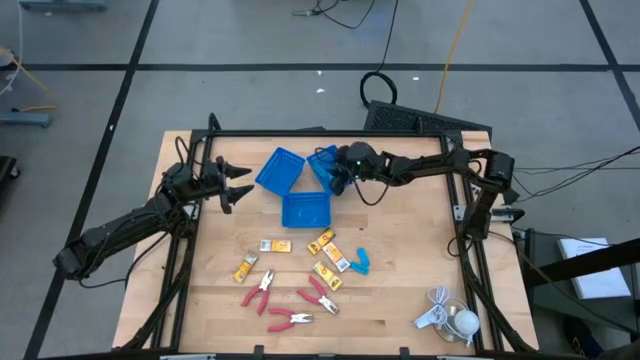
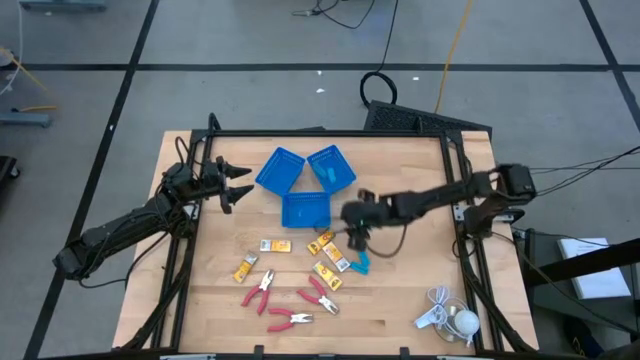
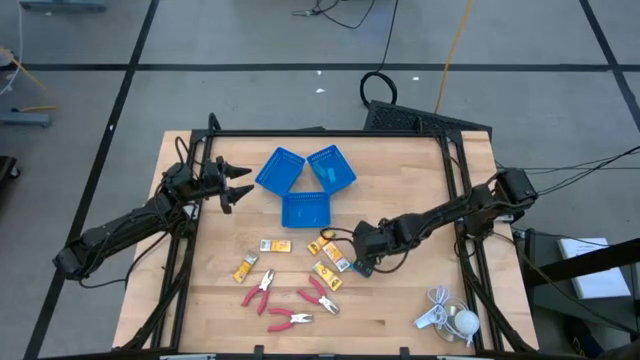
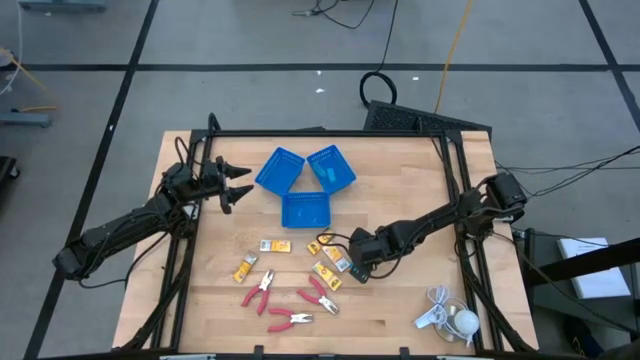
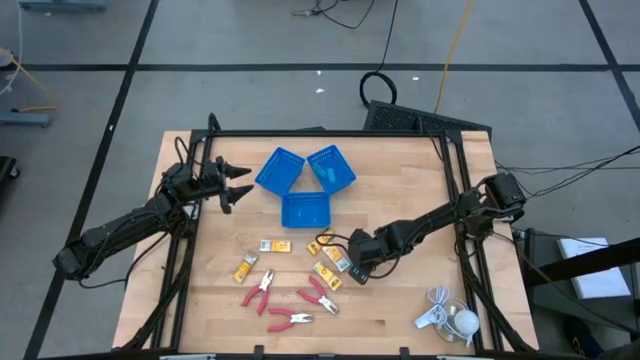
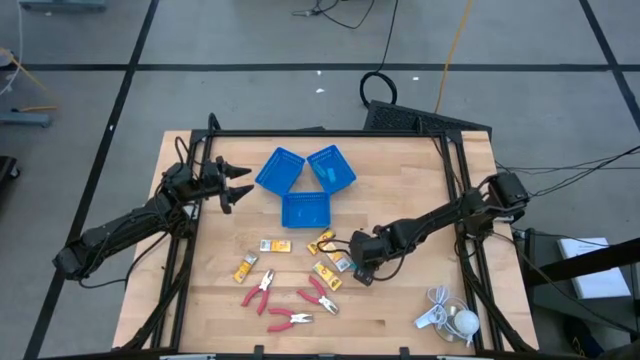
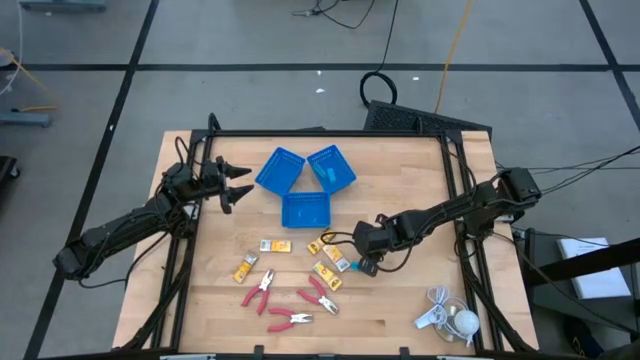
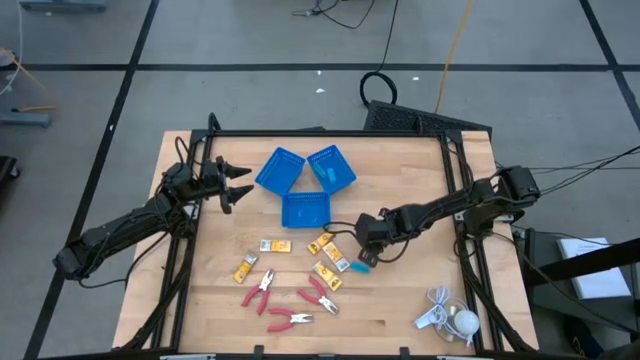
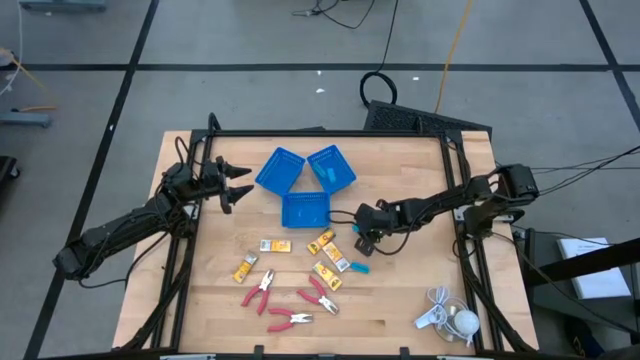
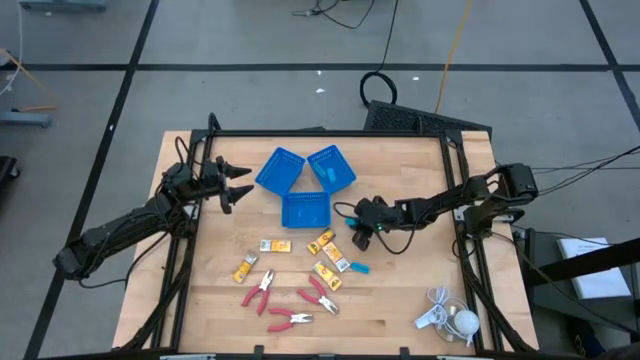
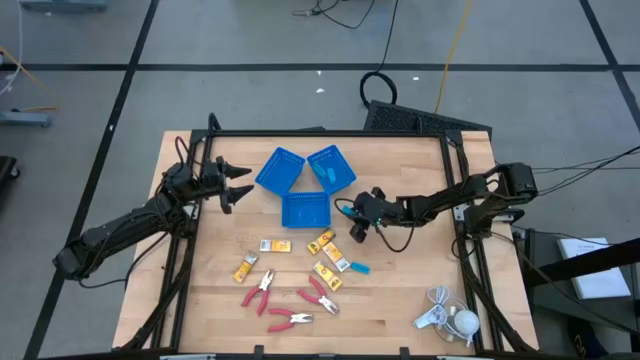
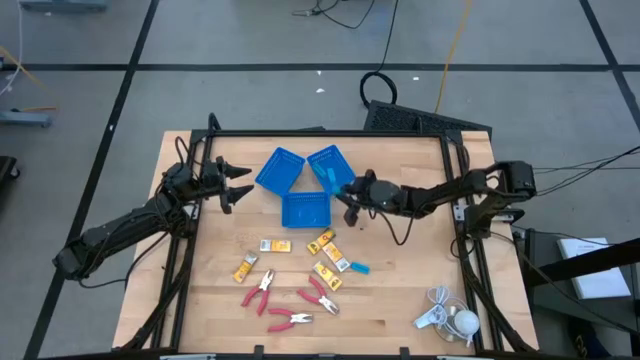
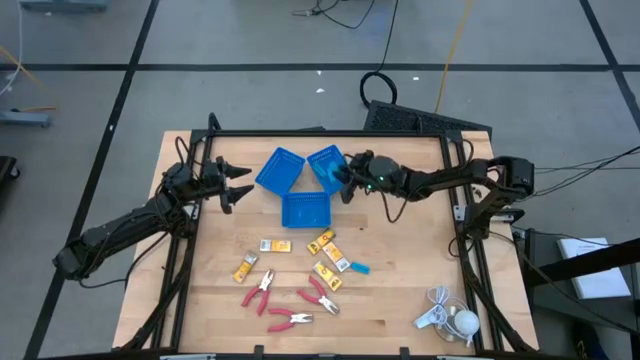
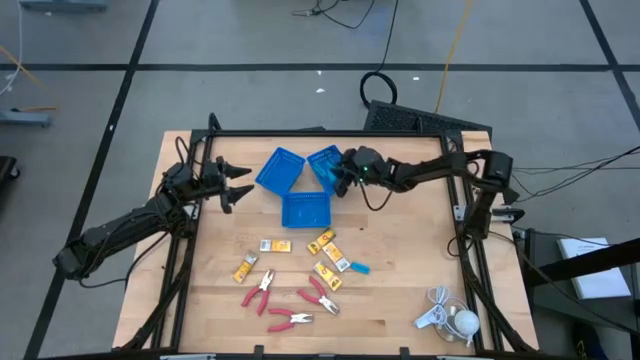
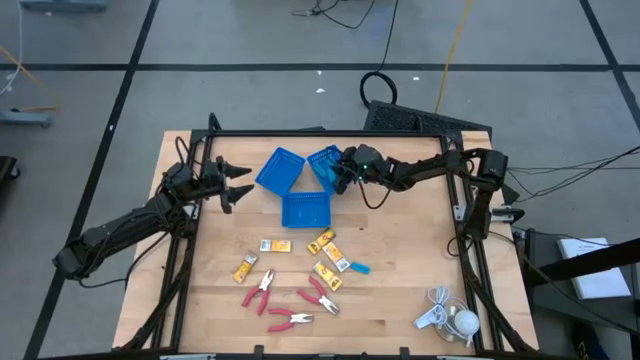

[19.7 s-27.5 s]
Task: Pick & Place School Supplies
Put the blue eraser into the top right blue bin

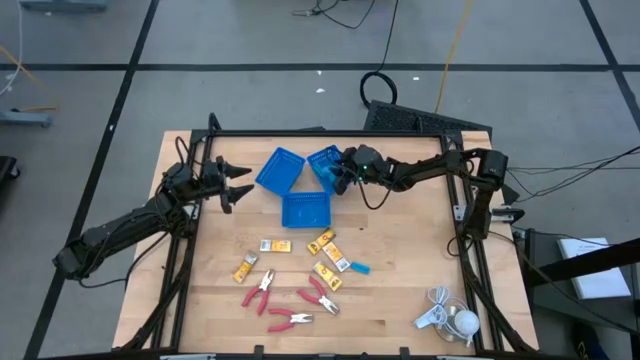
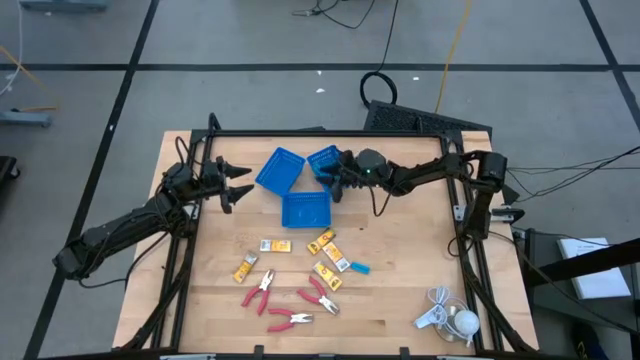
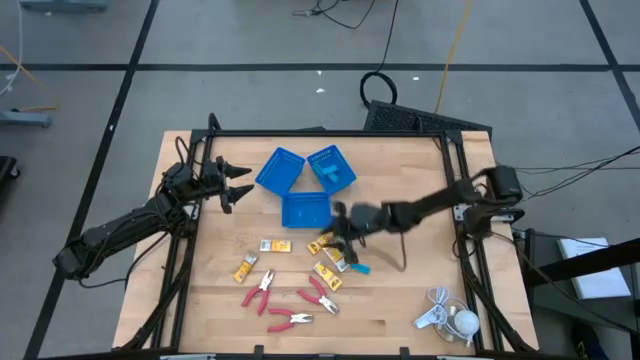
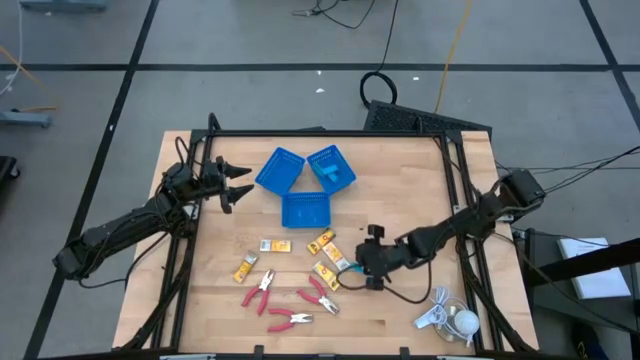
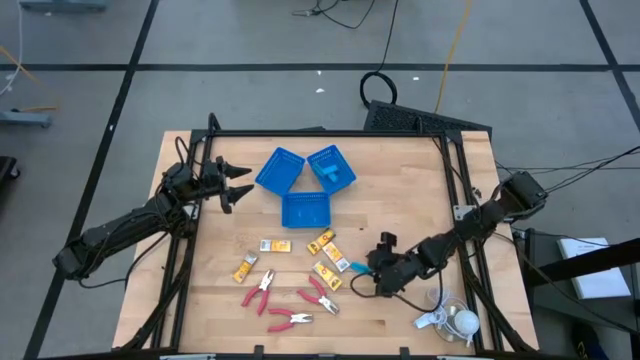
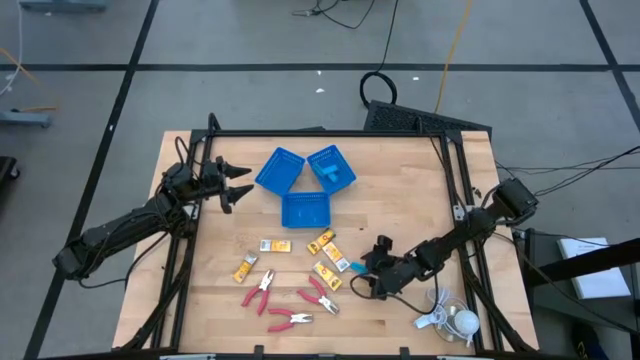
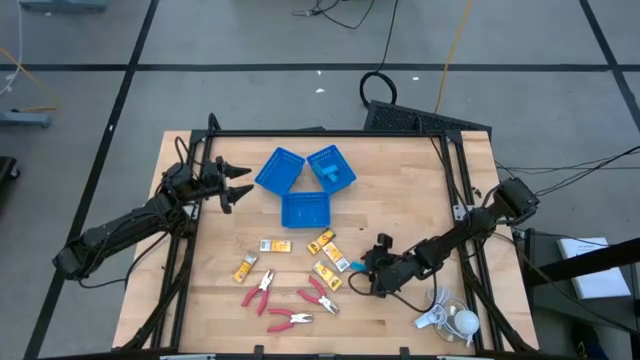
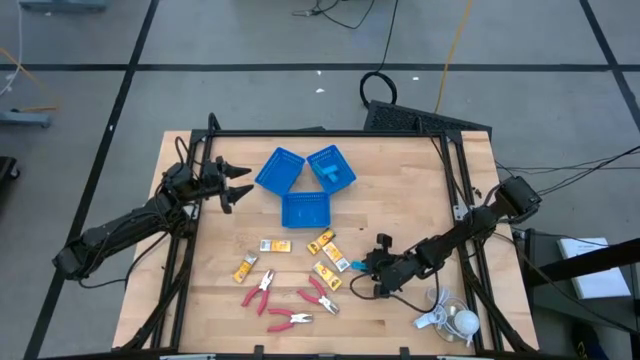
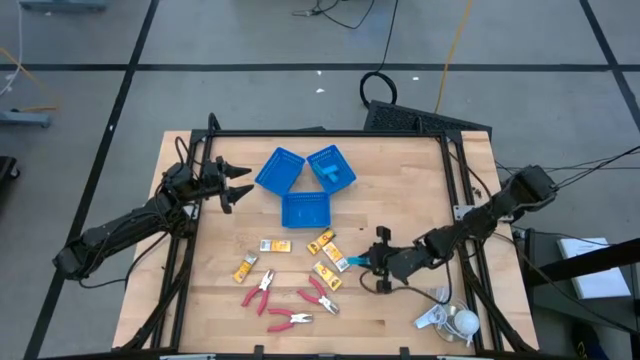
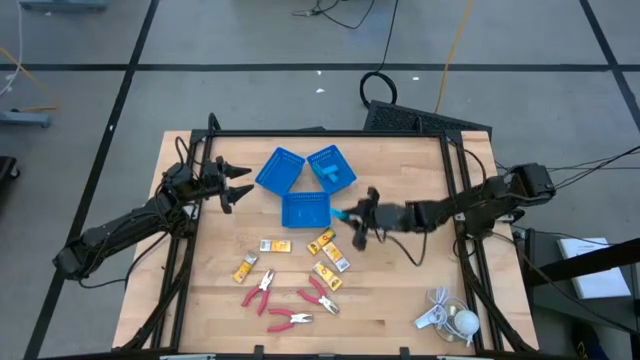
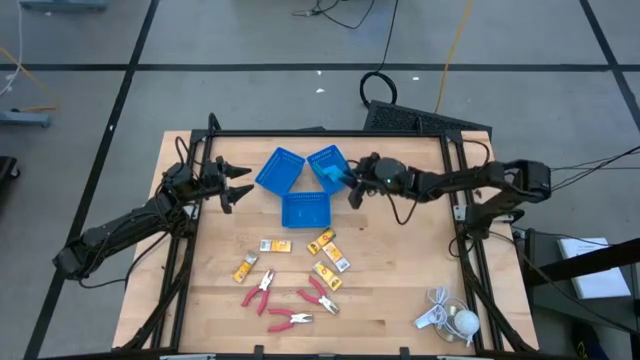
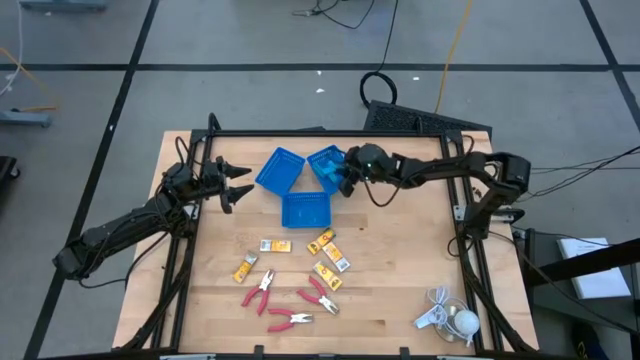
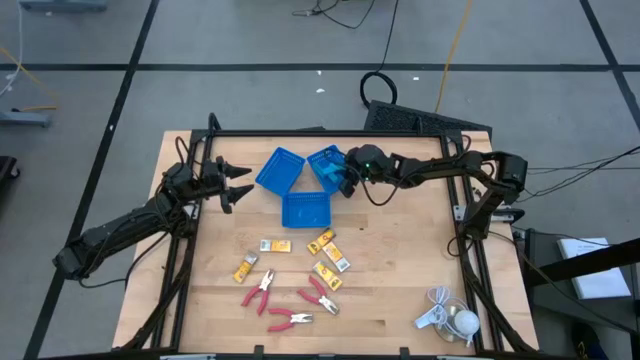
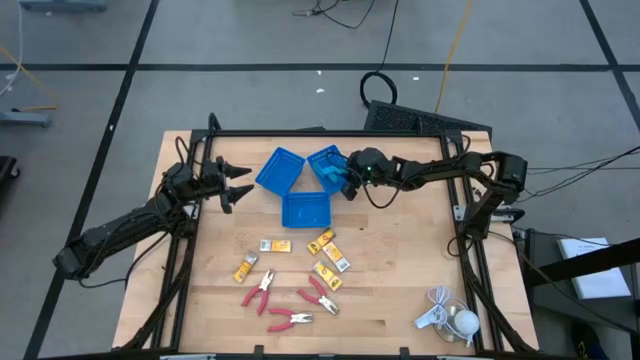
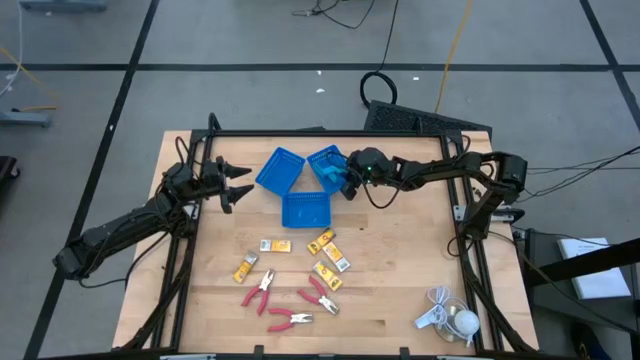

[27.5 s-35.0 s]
Put the blue eraser into the top right blue bin

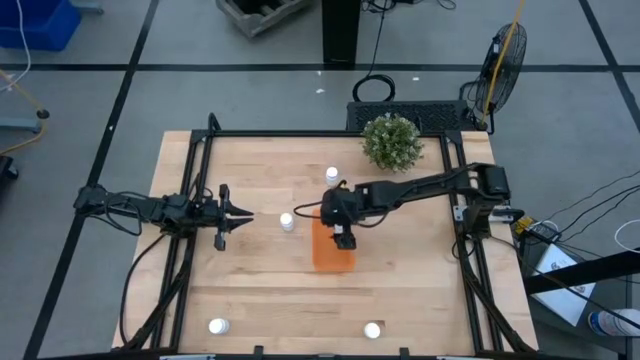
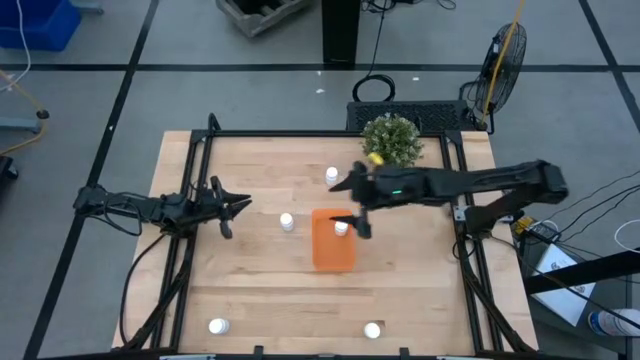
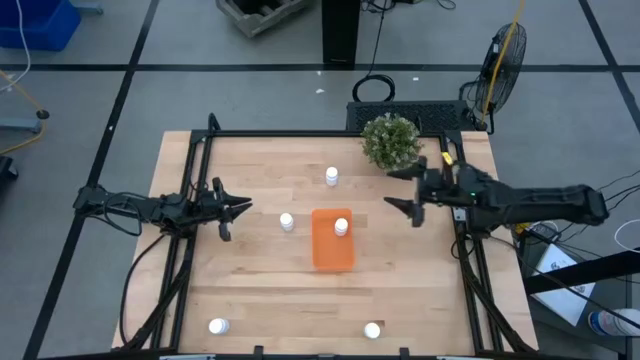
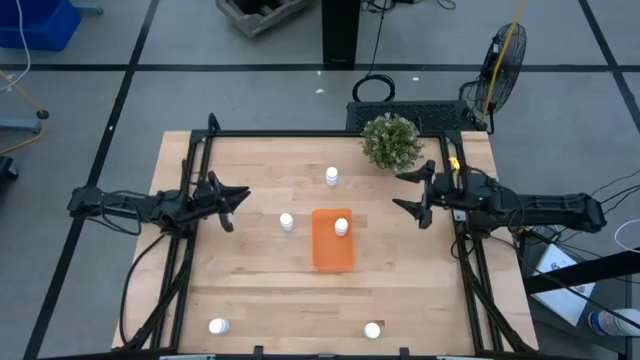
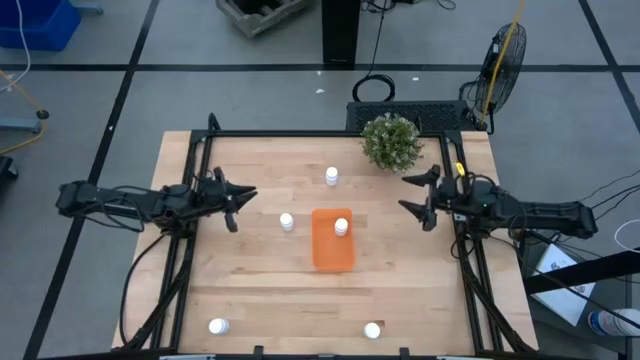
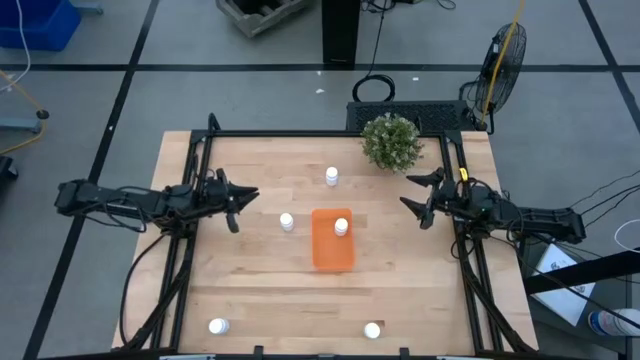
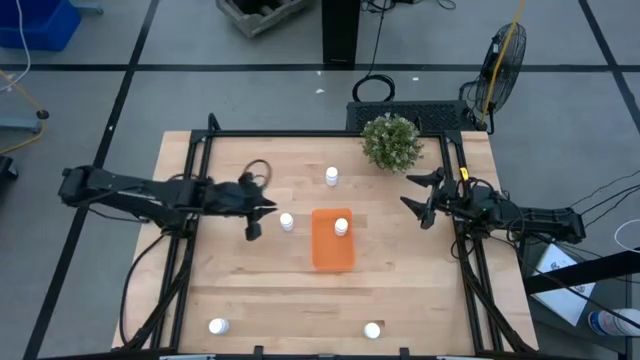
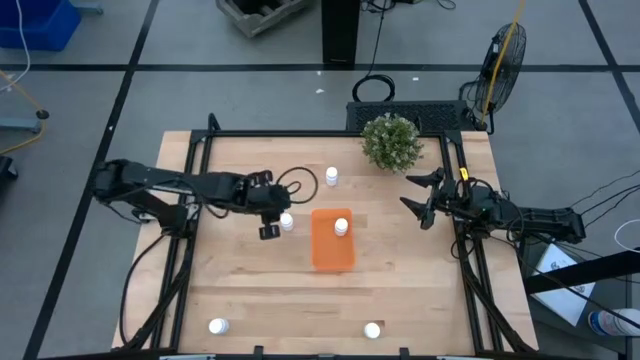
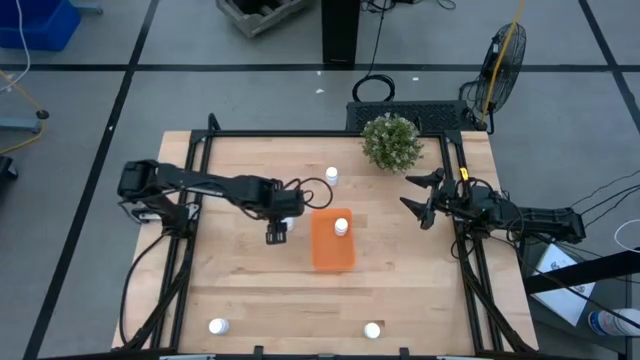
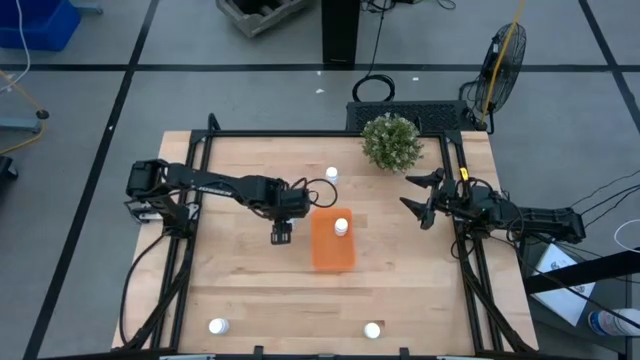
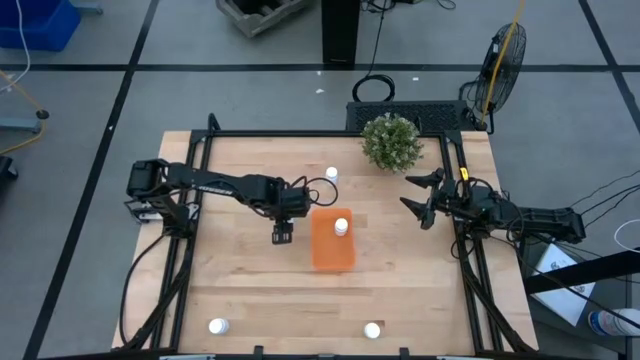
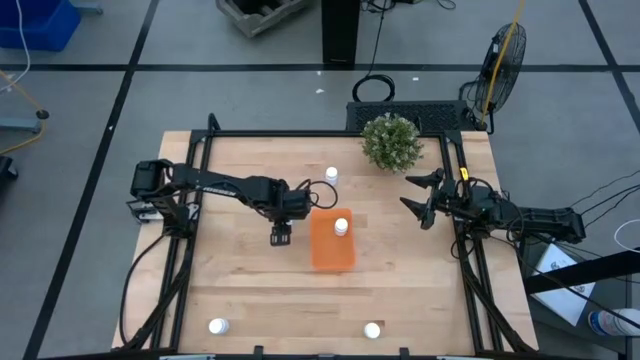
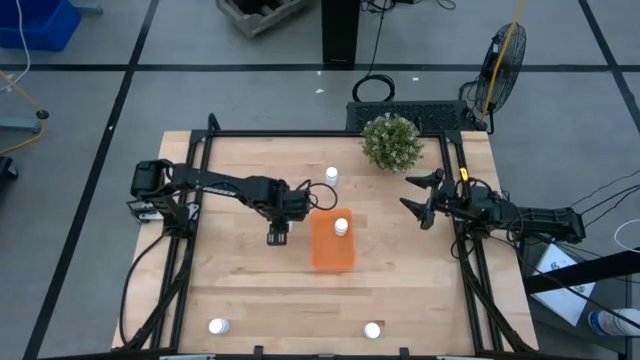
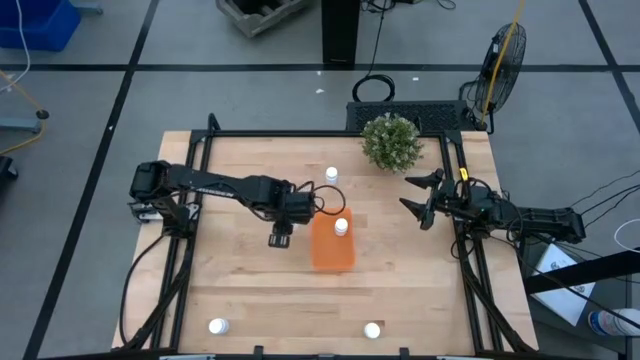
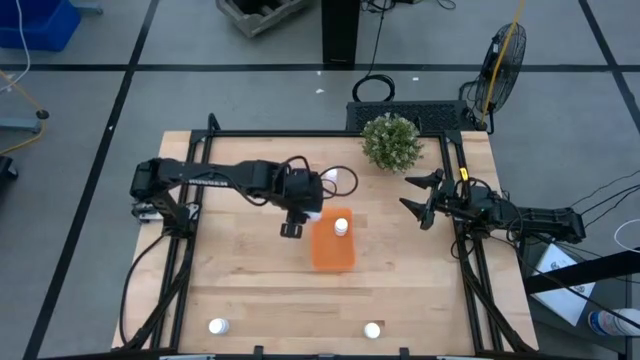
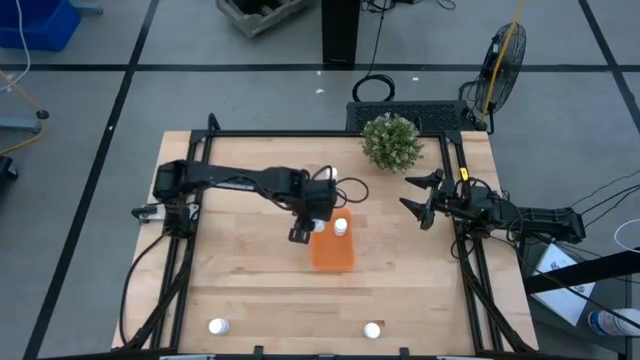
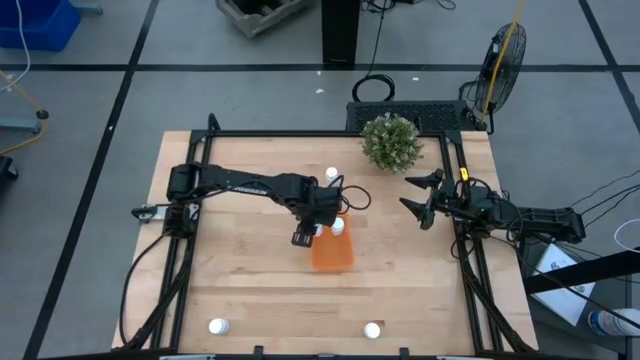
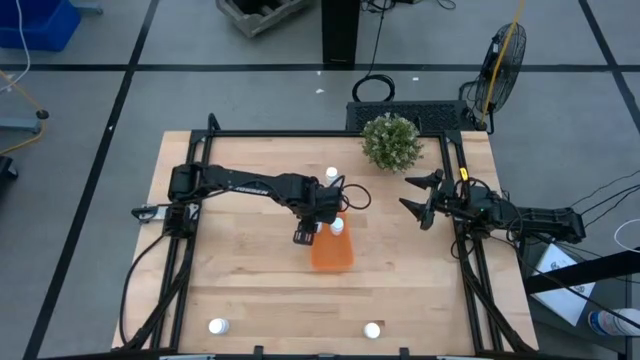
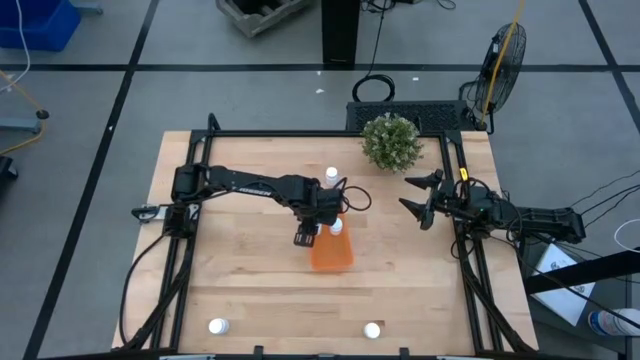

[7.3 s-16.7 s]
Task: Pick and place pill bottles into a basket
Put the white pill bottle into the orange container
